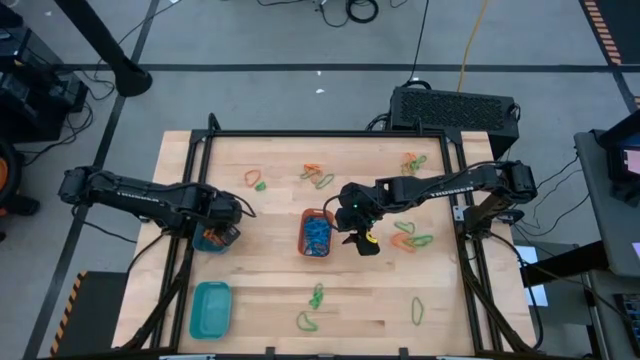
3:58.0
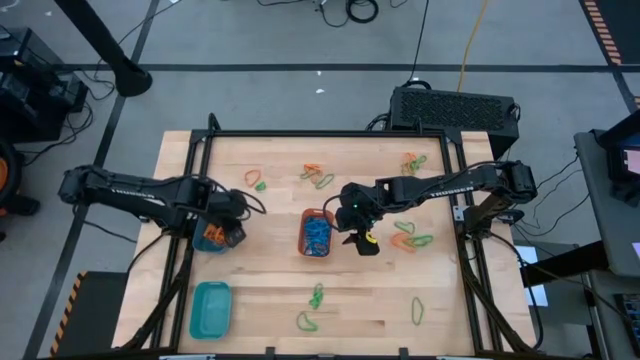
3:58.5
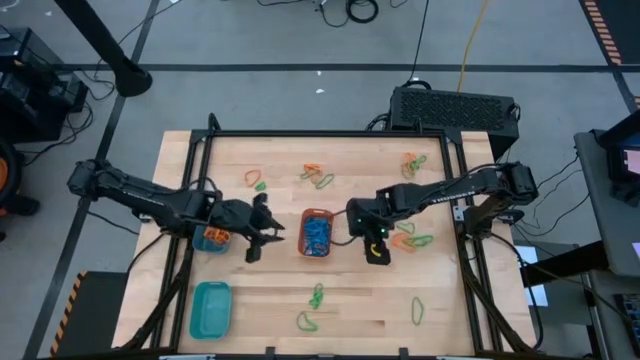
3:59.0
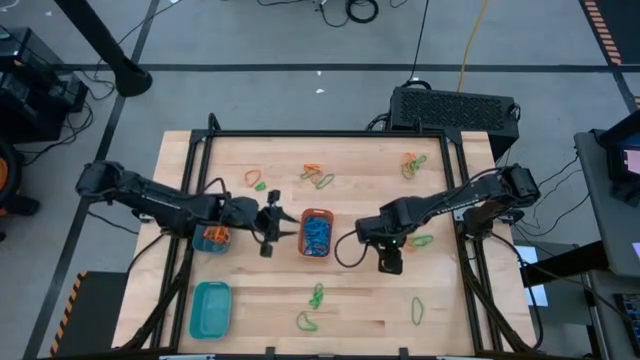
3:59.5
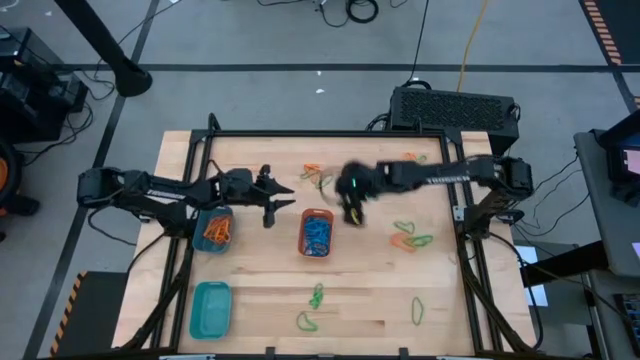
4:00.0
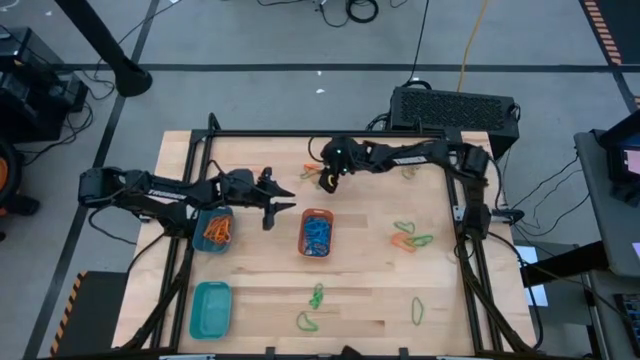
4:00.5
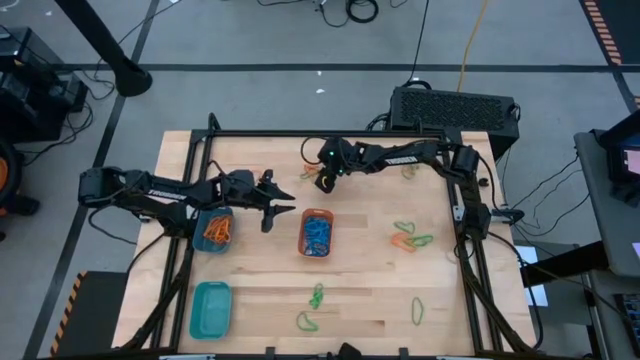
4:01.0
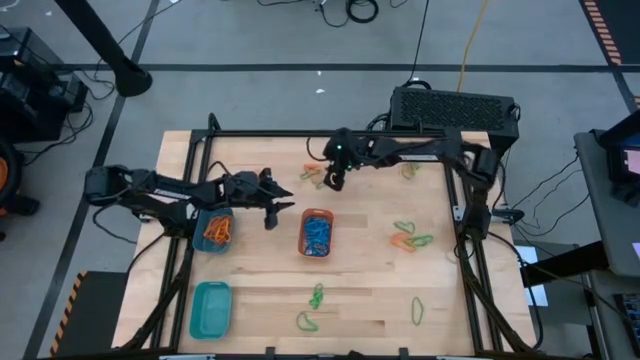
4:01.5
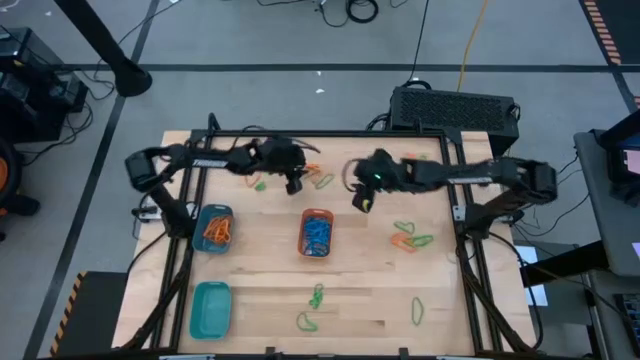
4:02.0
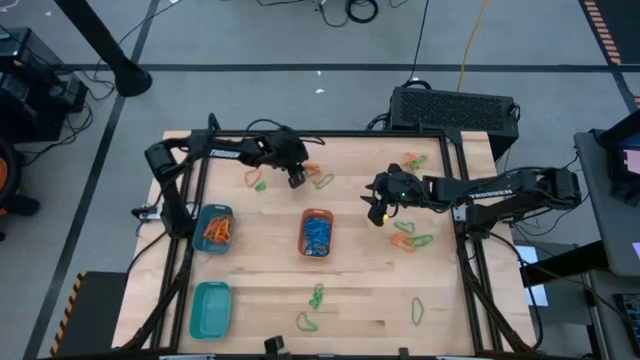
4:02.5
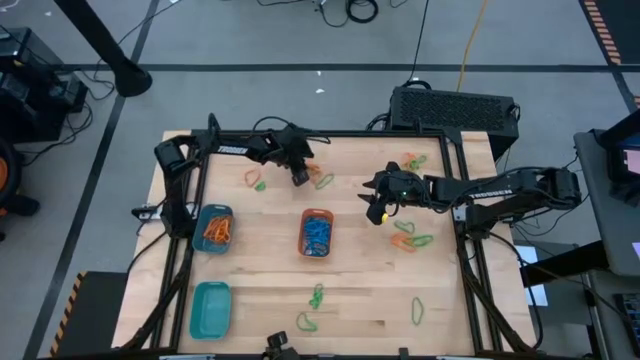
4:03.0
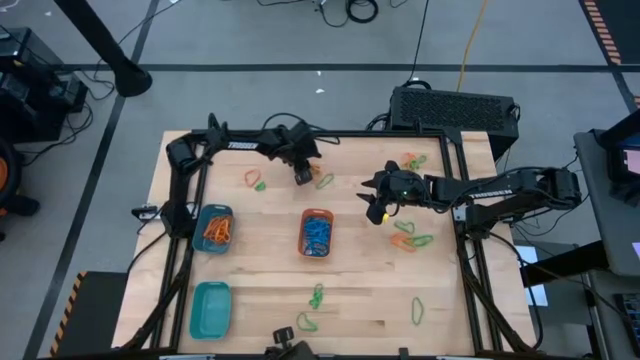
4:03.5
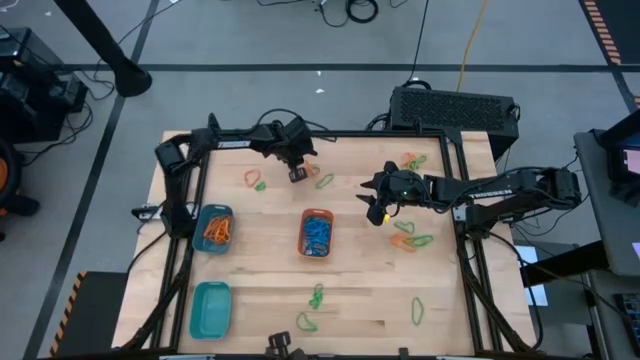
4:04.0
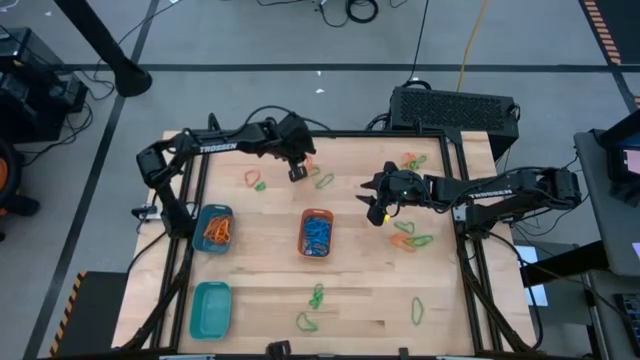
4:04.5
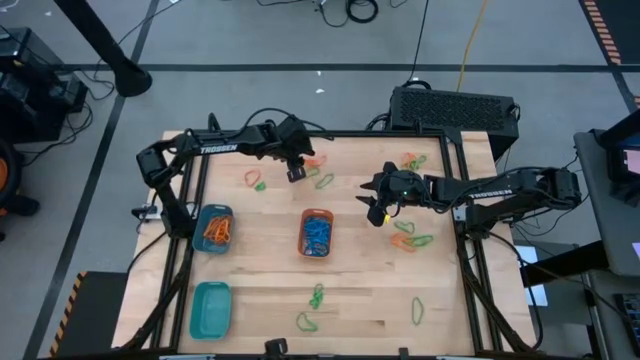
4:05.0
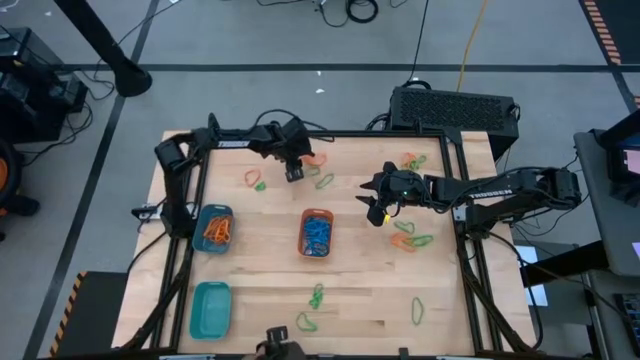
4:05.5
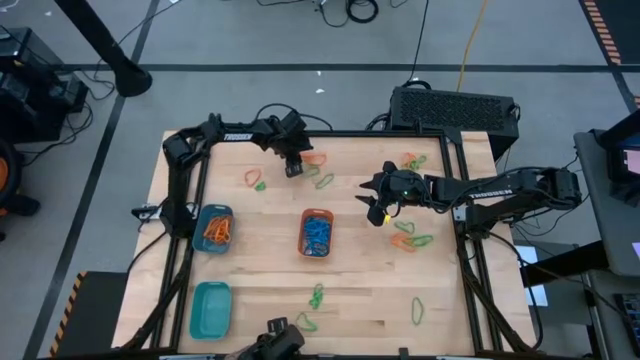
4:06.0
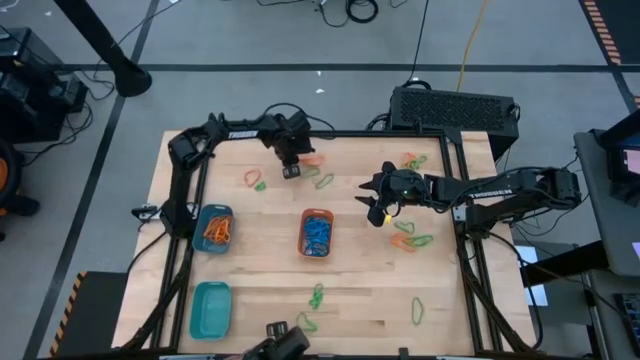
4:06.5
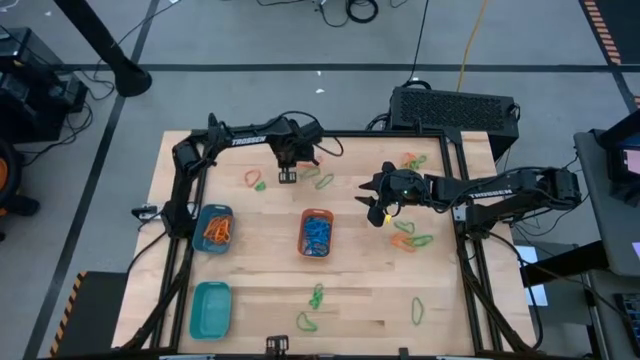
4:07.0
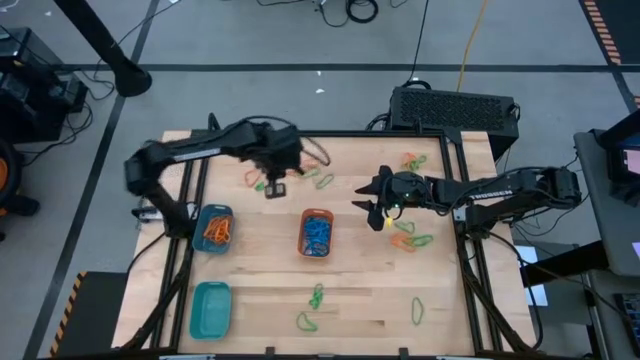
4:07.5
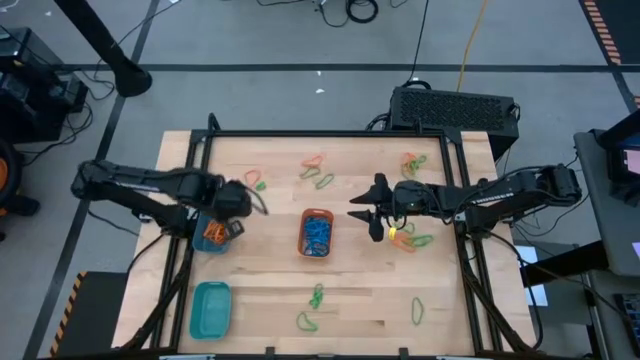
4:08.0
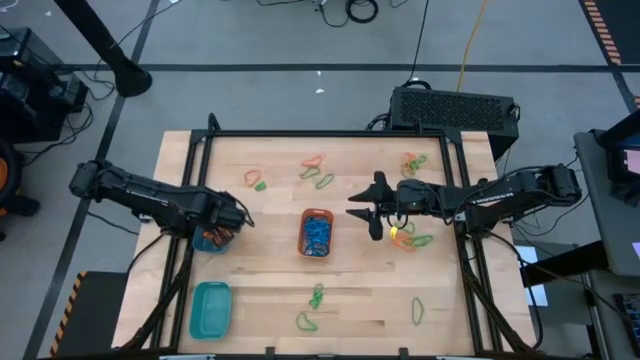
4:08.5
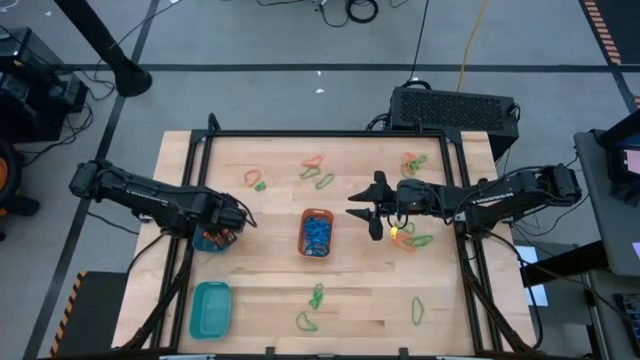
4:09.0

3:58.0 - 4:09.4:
Task: Sort rubber bands into baskets
Put the orange rubber band into the blue bin

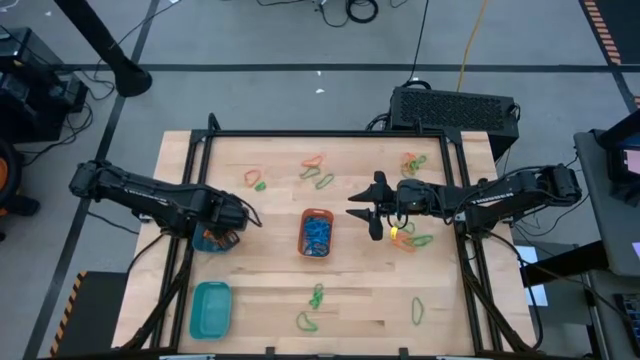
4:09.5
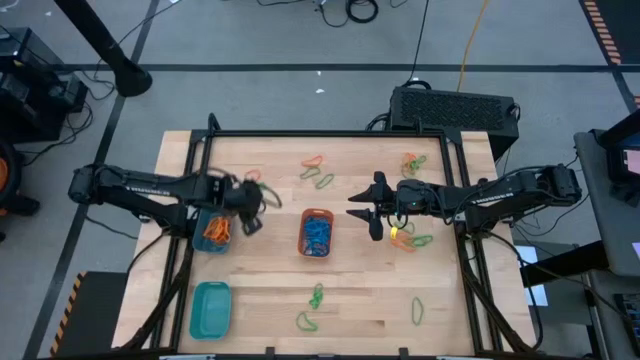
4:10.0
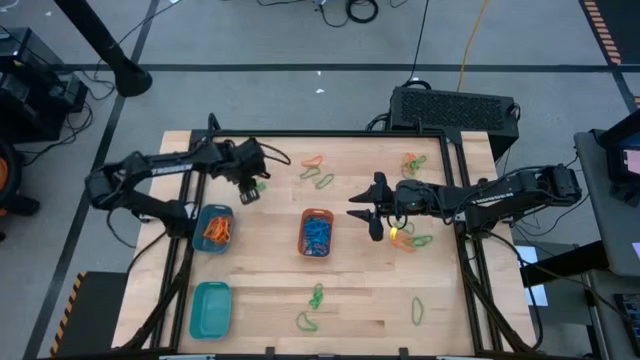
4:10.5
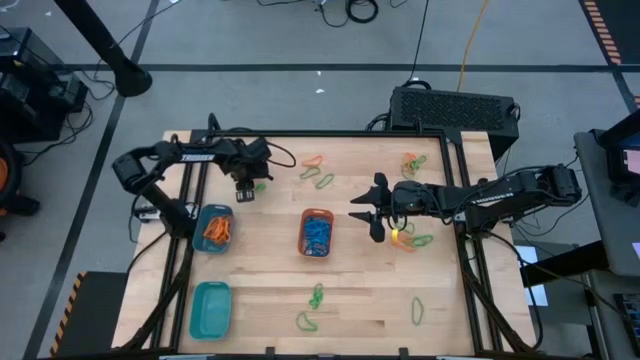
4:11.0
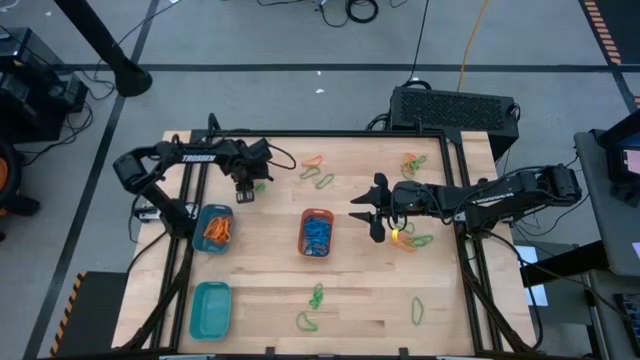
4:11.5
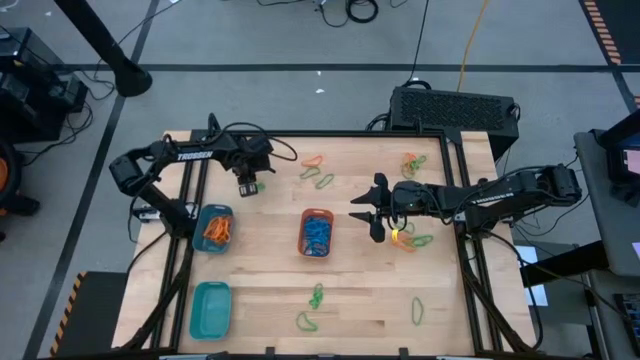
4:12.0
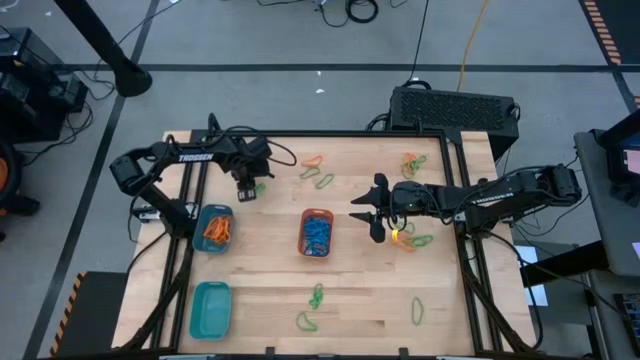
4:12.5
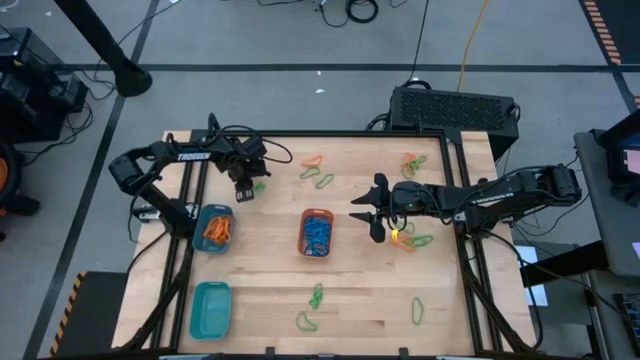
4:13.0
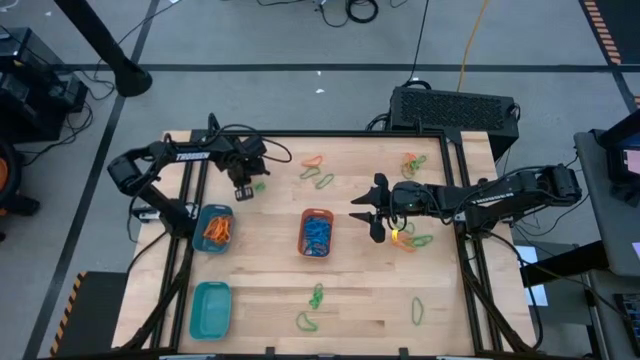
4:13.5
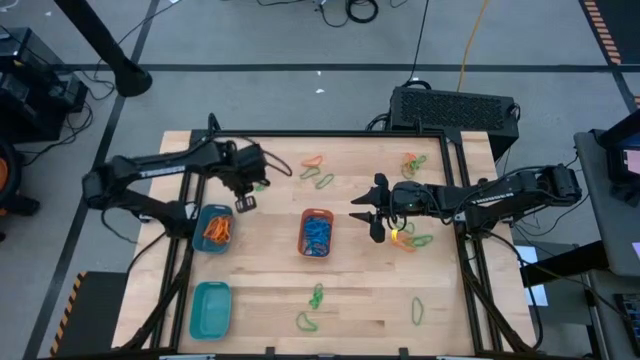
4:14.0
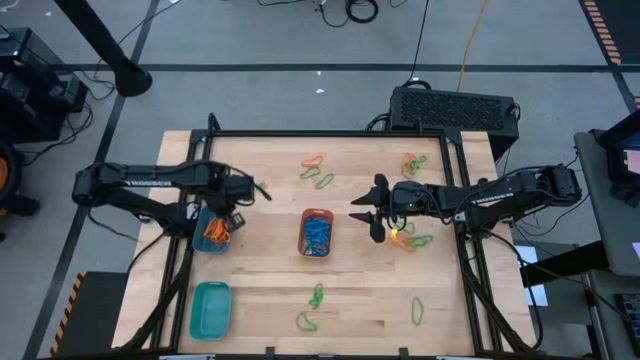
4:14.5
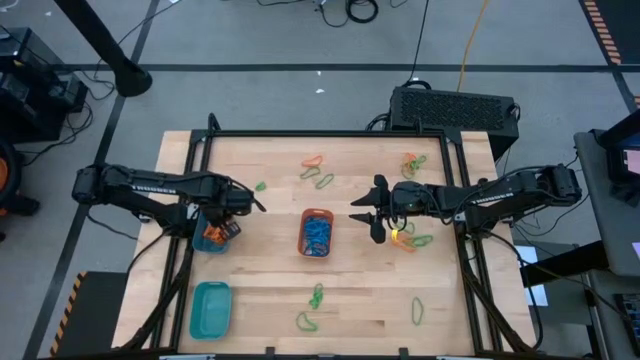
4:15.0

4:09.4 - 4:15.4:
Put the orange rubber band into the blue bin

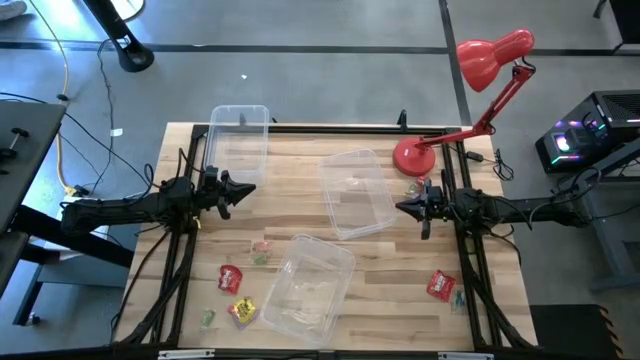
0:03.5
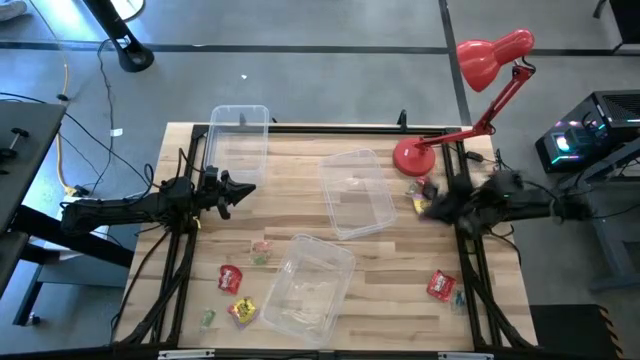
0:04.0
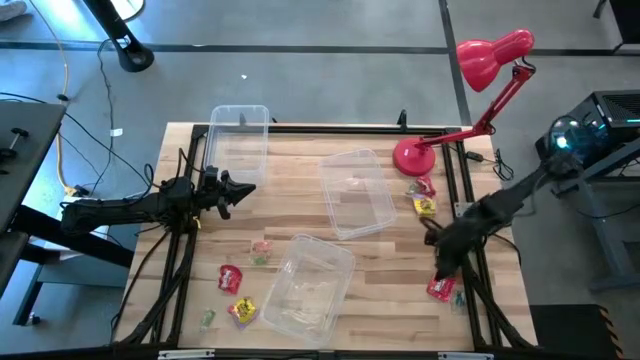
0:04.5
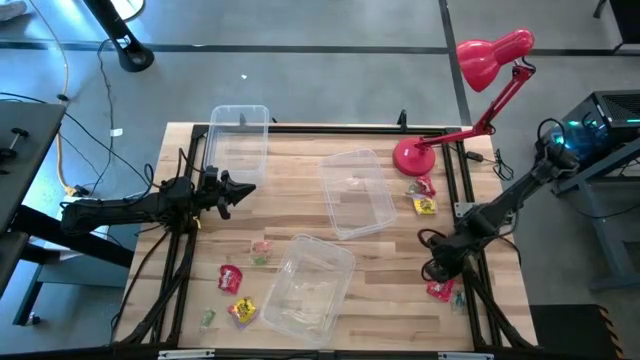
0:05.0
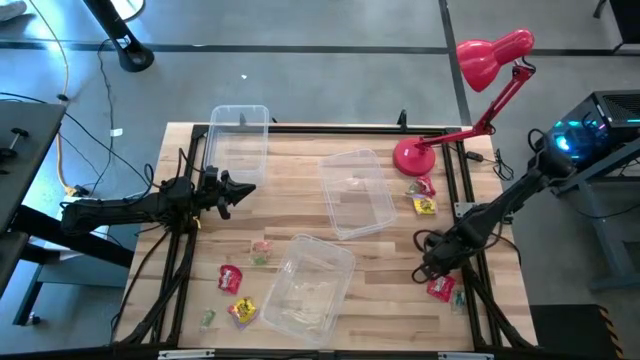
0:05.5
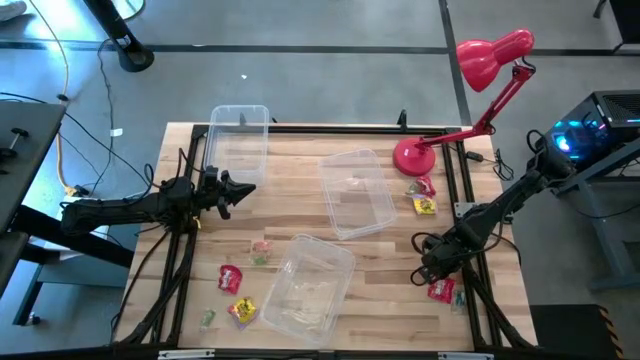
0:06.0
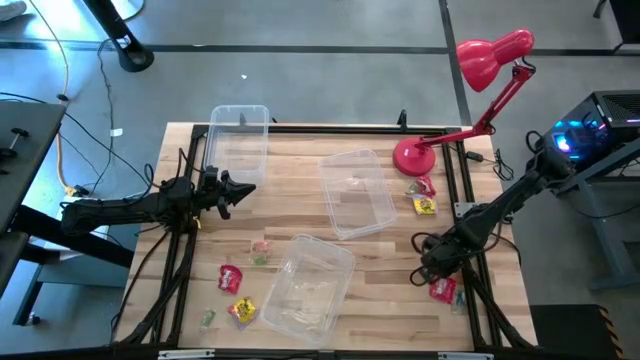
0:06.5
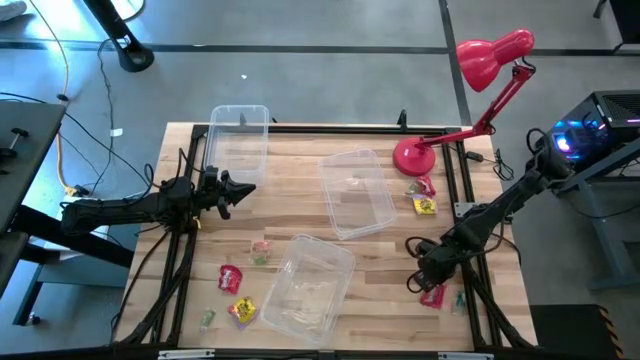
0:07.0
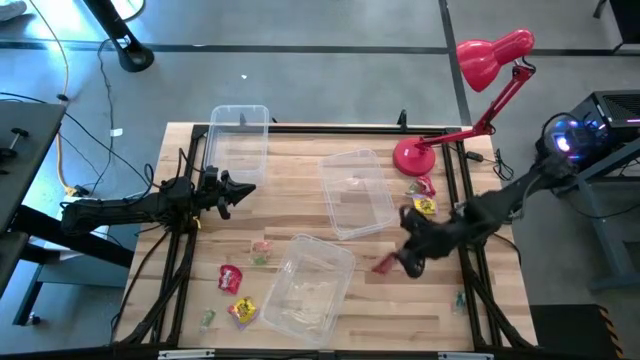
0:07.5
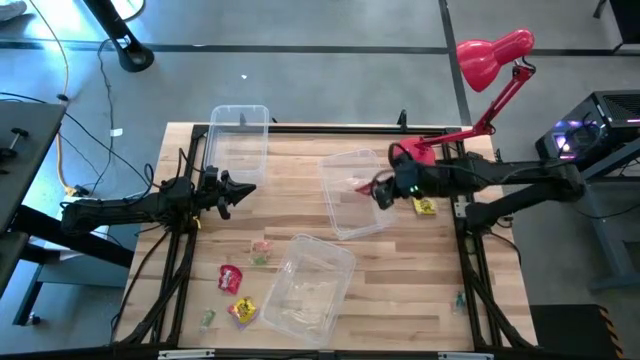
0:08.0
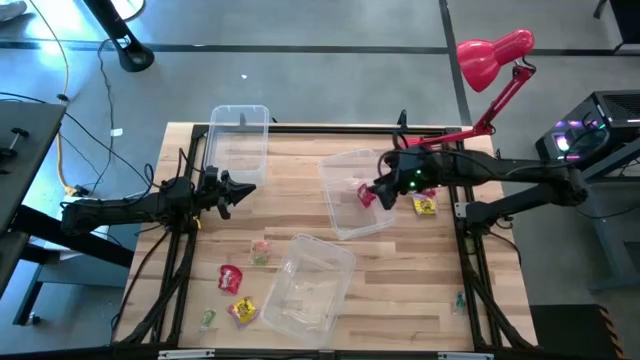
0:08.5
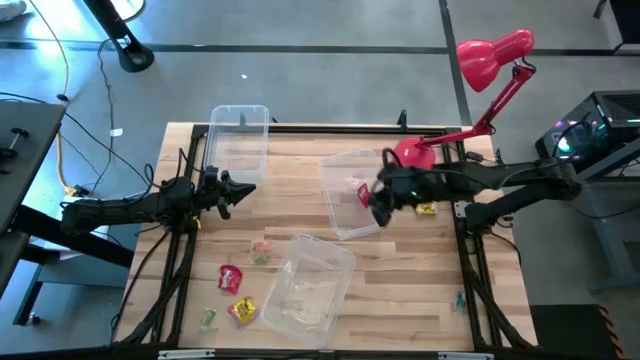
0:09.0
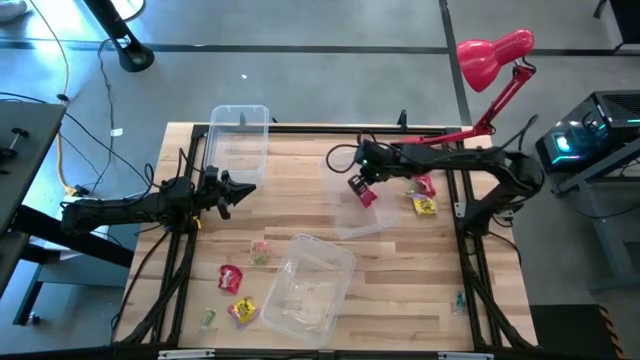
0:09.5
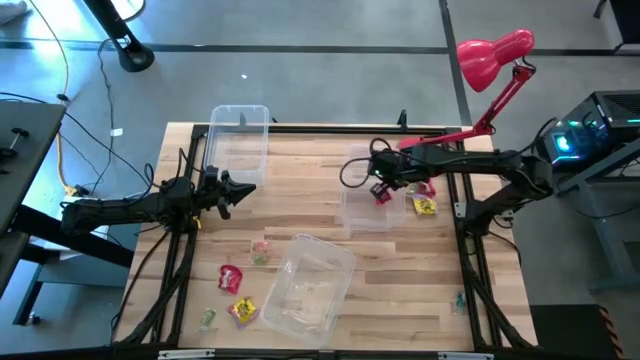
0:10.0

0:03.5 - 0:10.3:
Task: Sort candy
Put the bottom right red candy pack into the center transparent bin
